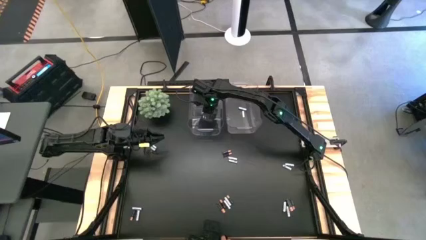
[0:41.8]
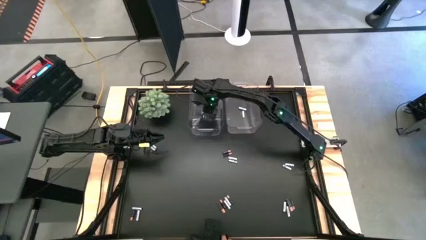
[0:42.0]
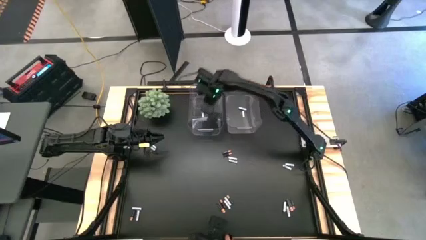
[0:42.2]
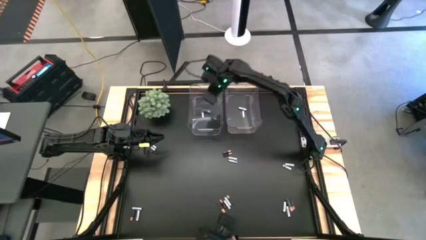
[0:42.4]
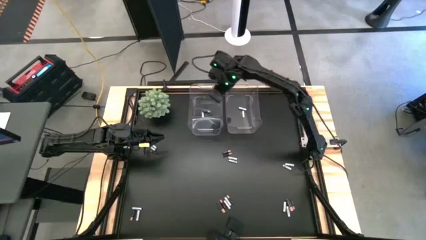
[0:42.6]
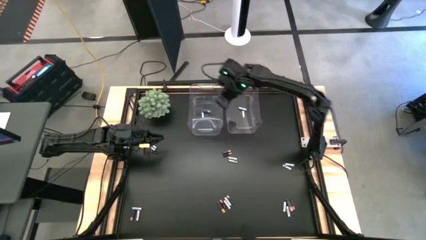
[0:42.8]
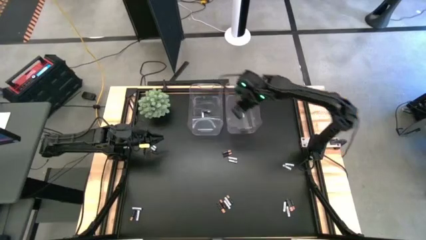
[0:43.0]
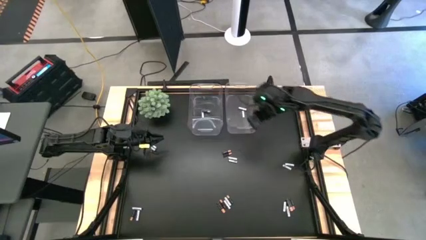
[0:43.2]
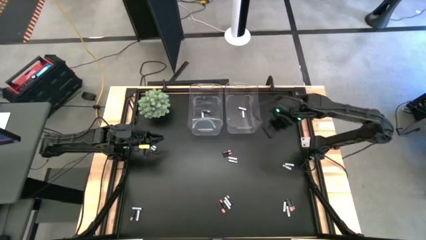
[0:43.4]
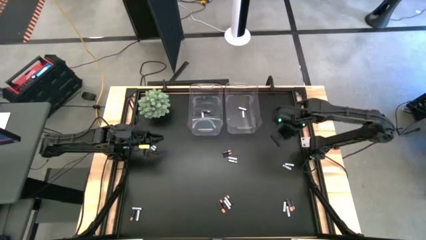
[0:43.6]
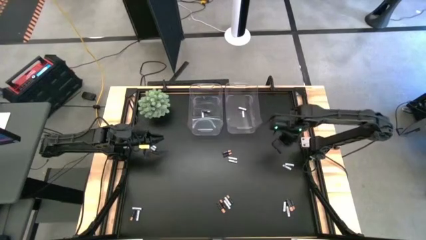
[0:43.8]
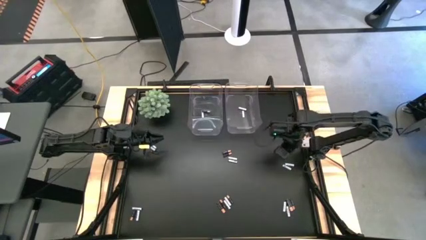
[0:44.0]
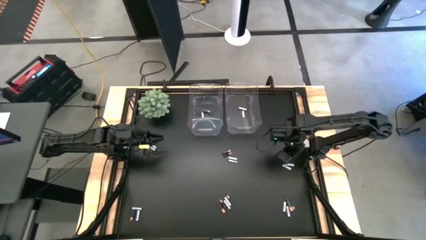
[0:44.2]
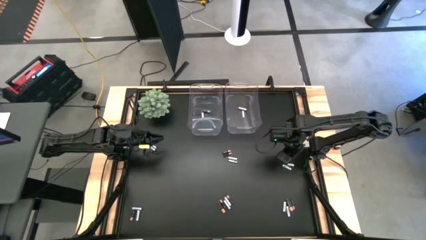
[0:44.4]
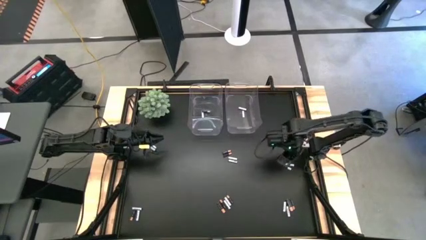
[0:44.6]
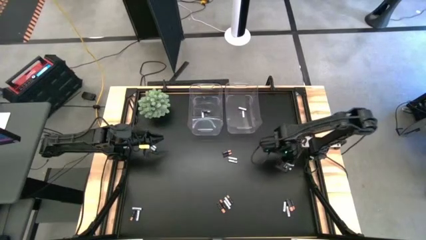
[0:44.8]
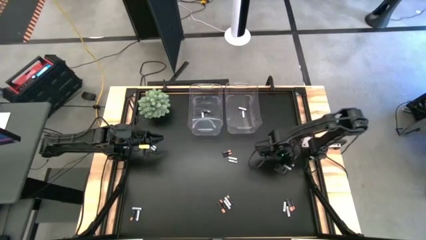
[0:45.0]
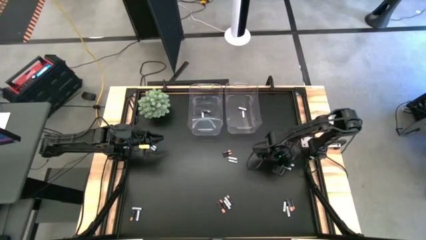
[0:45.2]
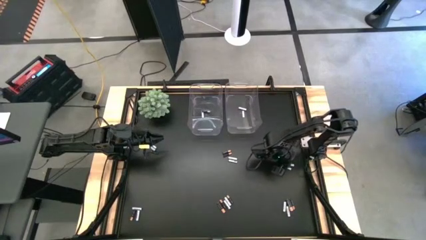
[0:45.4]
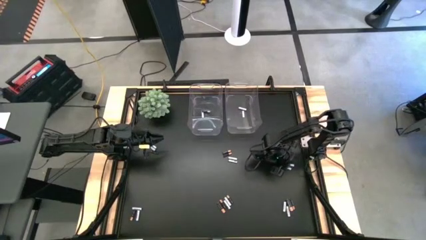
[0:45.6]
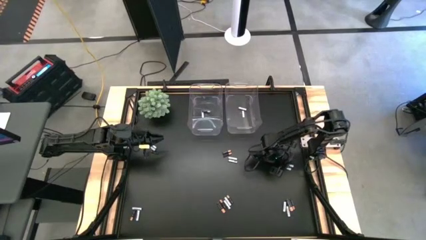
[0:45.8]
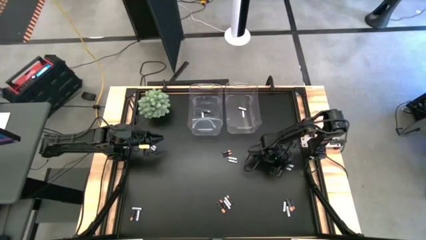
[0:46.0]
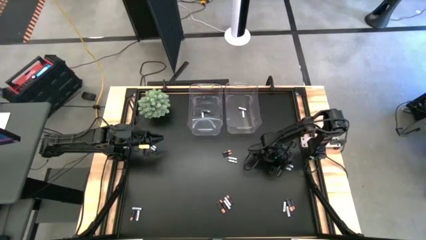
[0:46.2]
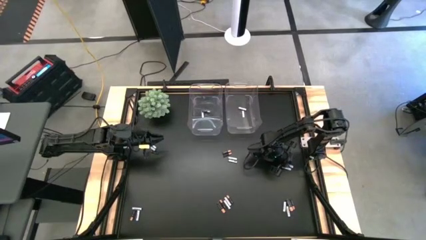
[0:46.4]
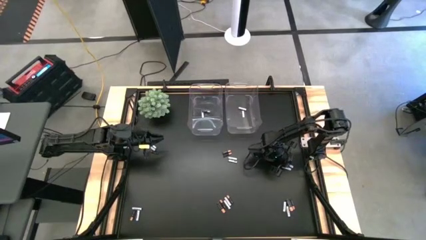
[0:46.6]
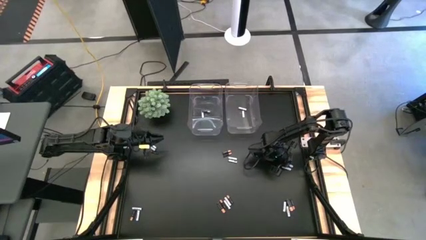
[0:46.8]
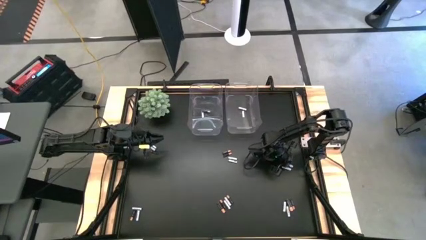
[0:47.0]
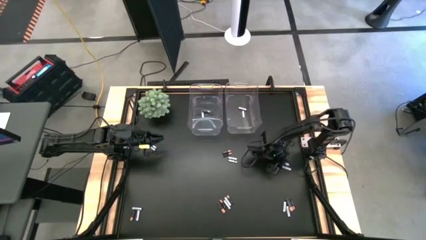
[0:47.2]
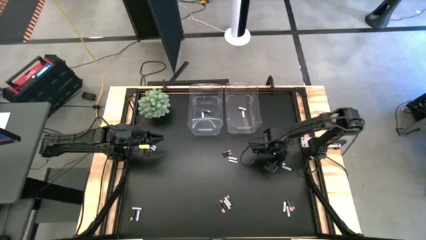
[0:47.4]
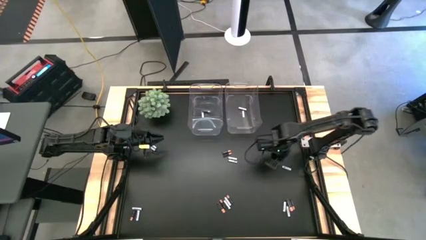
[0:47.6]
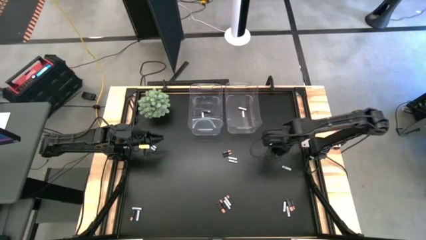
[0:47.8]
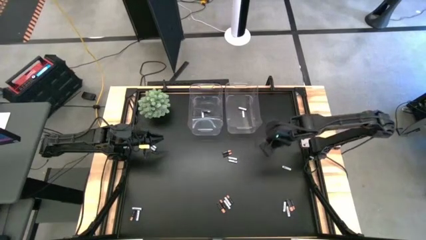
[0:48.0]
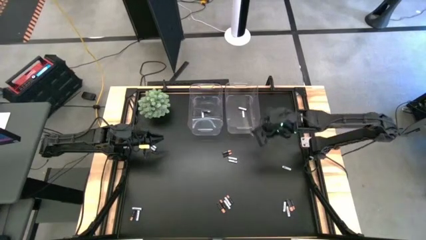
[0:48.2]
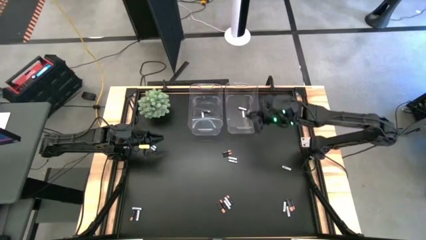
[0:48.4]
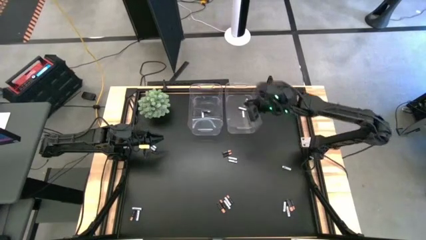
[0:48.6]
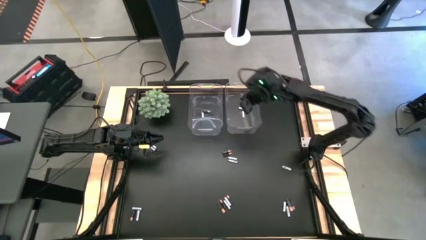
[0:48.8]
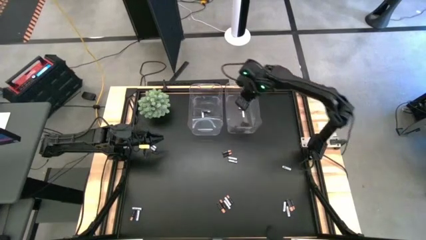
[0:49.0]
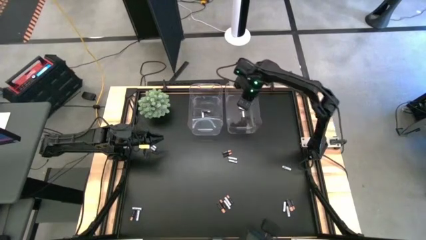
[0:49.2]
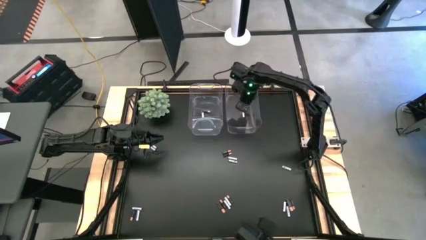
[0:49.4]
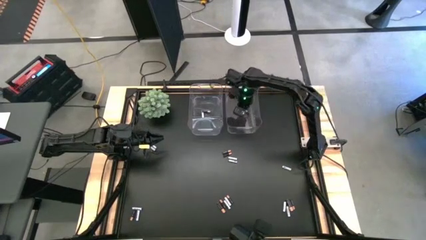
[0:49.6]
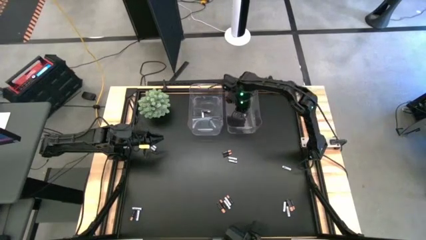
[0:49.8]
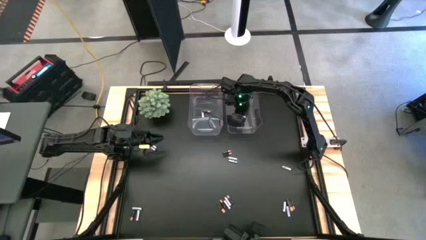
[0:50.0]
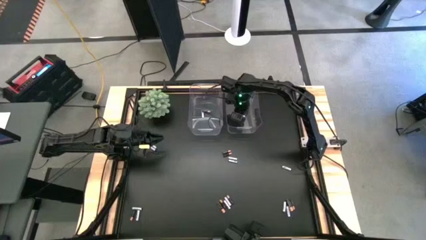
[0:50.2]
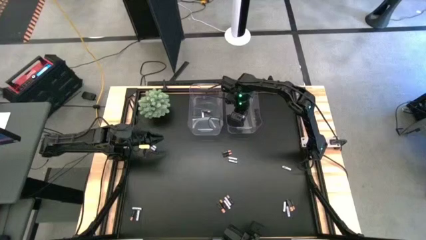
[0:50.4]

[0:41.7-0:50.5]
Task: Sort batteries
Put the white battery into the right transparent bin

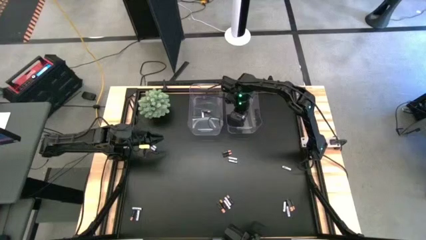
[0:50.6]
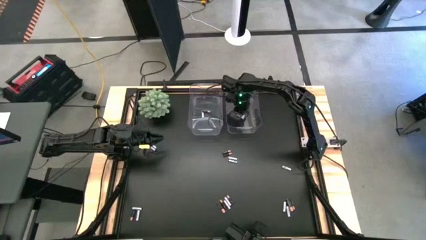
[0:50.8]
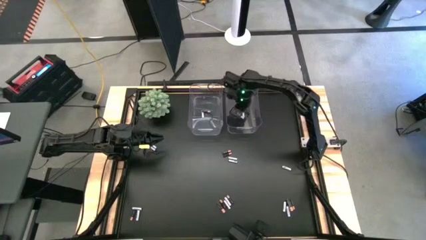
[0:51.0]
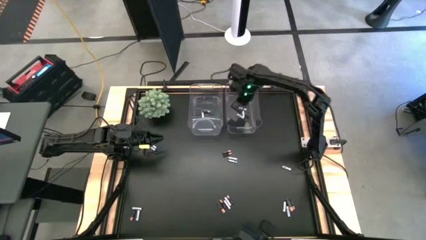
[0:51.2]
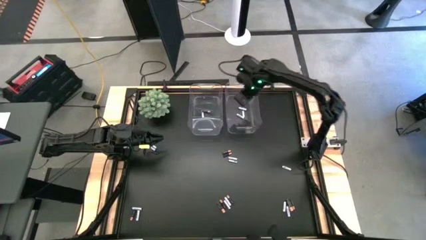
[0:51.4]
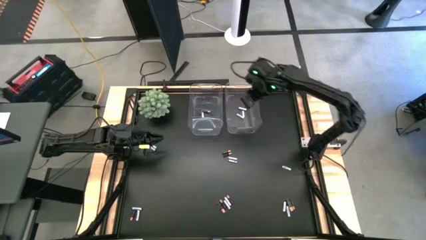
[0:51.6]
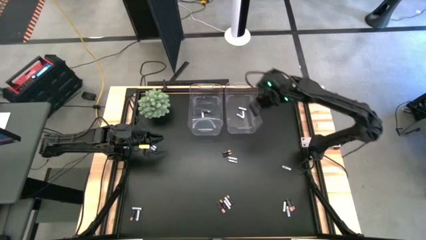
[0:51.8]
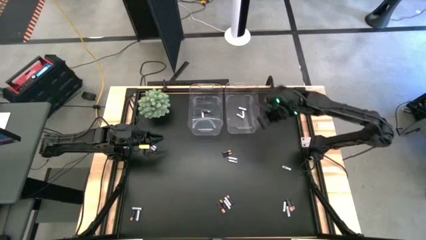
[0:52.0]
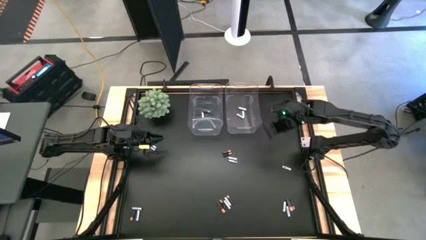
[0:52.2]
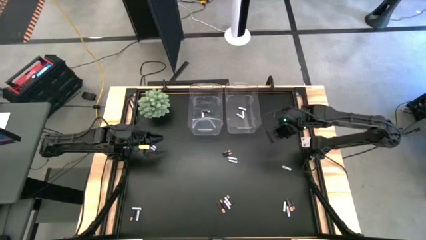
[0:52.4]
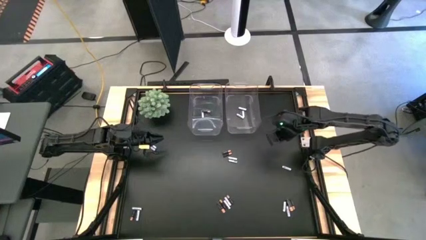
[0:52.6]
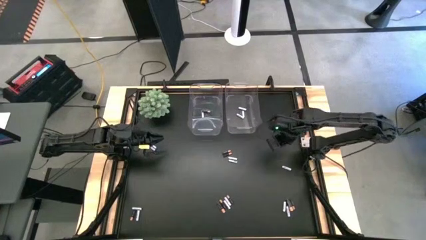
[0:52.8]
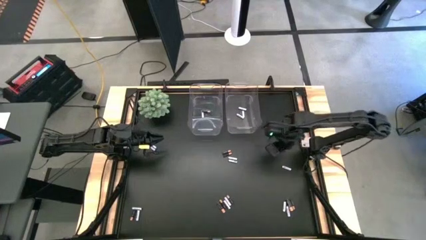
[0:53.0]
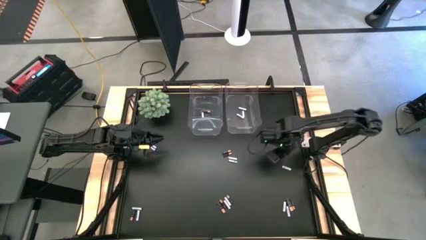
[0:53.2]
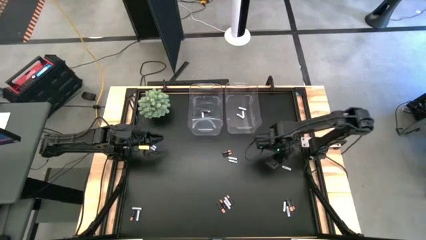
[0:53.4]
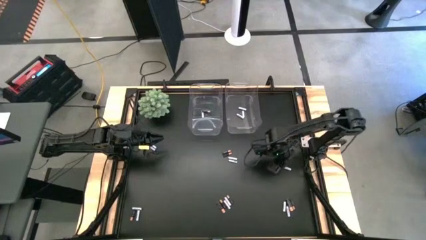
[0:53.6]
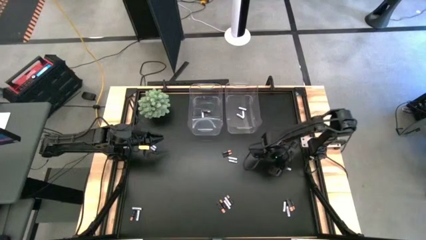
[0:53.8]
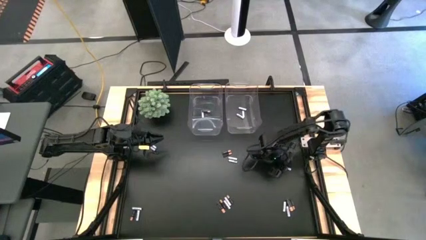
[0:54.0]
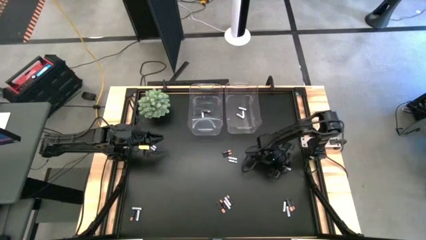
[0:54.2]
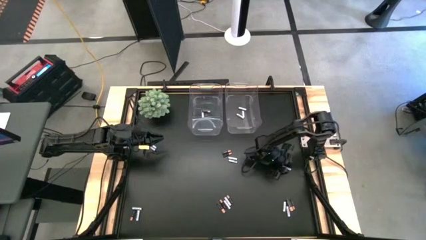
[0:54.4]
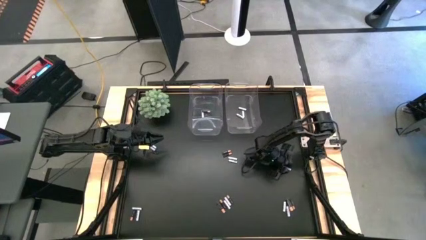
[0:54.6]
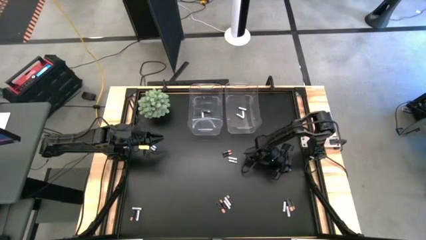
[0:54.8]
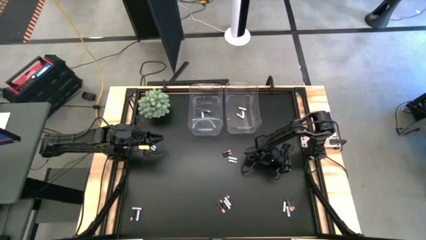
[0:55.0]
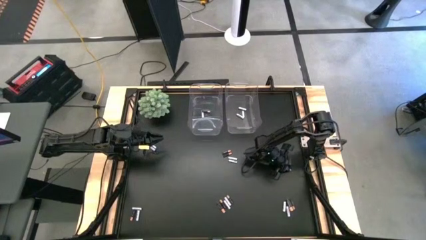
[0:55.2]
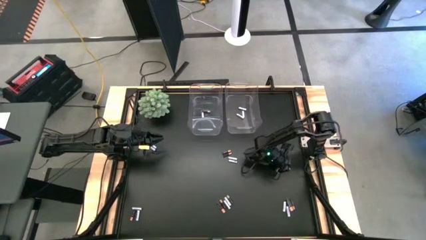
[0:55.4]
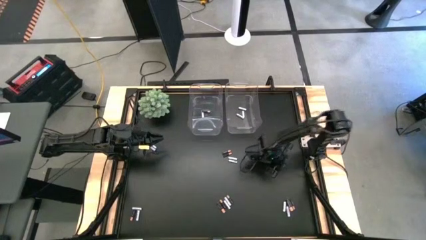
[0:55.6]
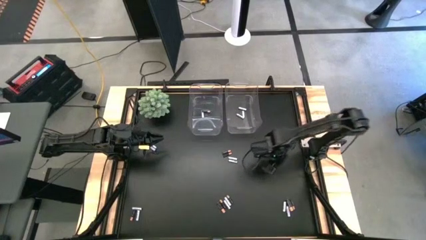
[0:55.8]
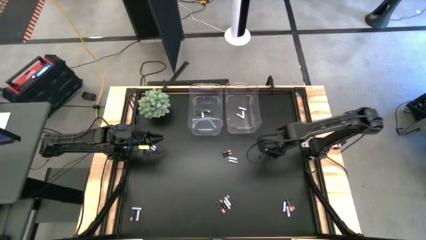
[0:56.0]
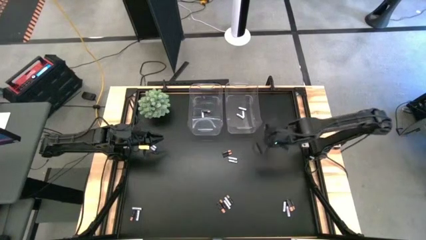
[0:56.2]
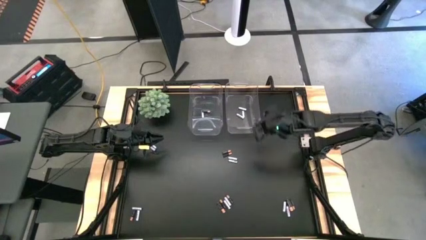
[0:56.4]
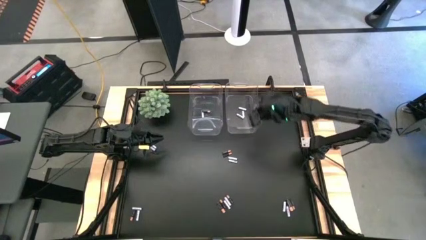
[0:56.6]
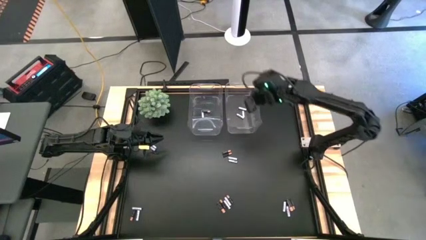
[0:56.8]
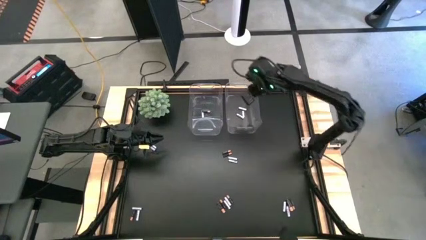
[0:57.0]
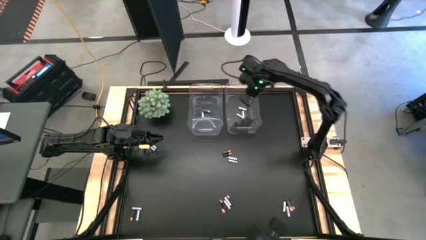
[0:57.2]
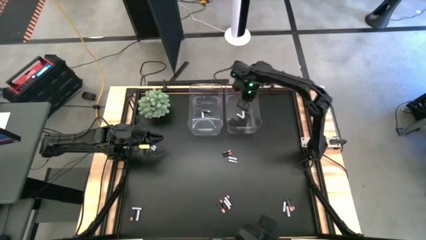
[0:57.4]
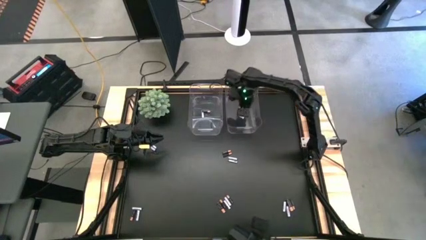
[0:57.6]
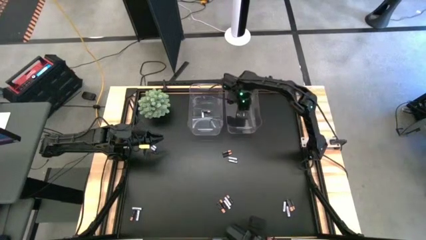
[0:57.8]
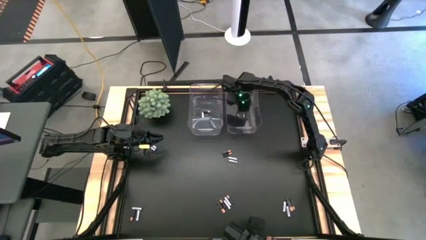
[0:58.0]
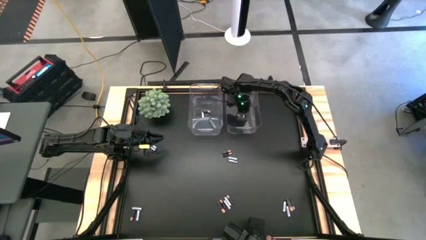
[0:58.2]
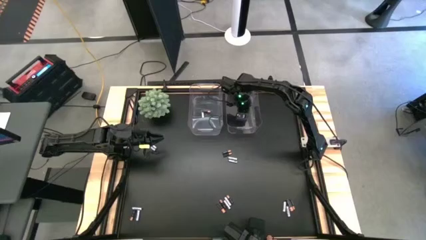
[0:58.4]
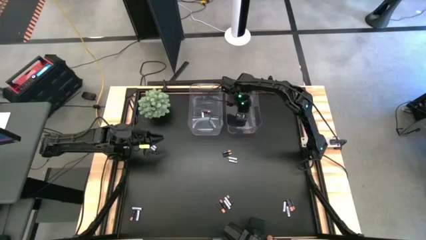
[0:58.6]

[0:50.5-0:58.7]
Put the white battery into the right transparent bin
